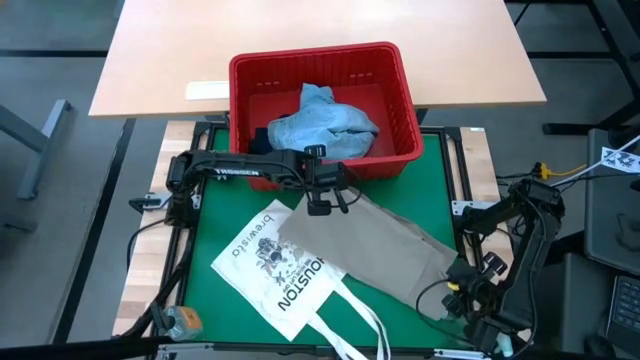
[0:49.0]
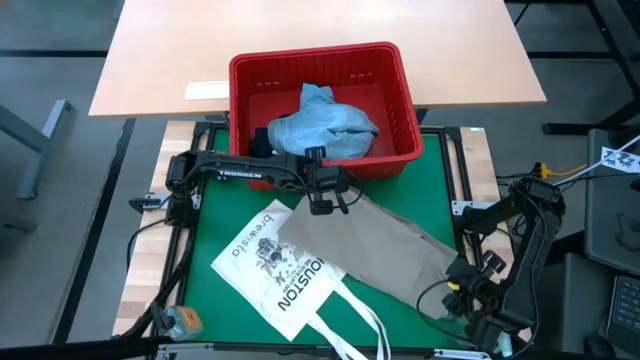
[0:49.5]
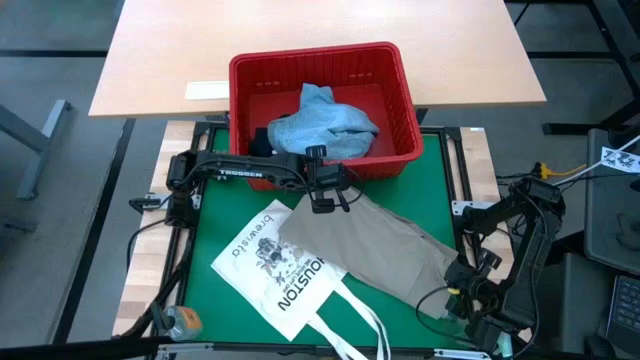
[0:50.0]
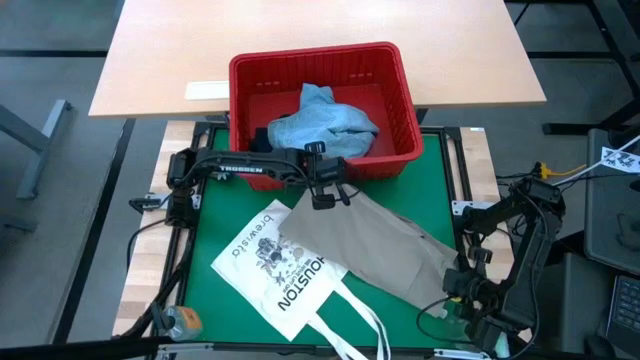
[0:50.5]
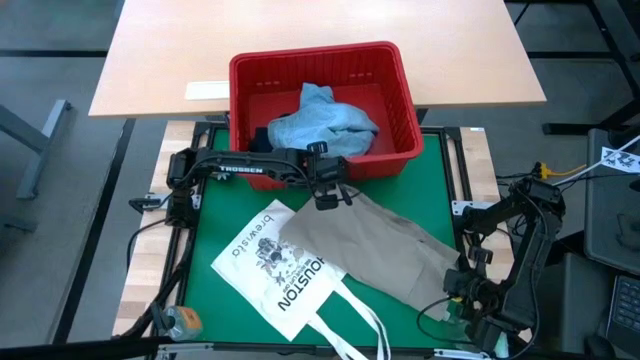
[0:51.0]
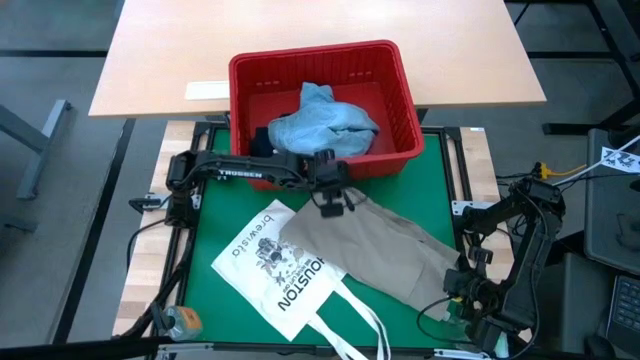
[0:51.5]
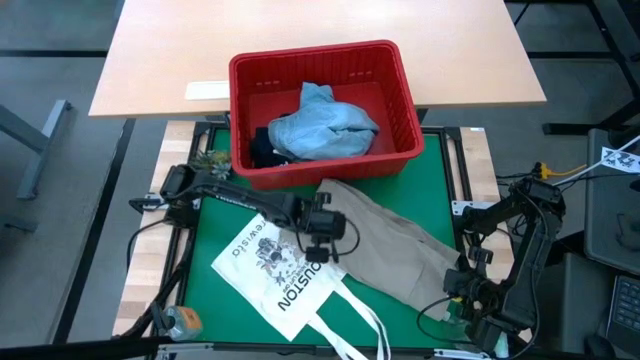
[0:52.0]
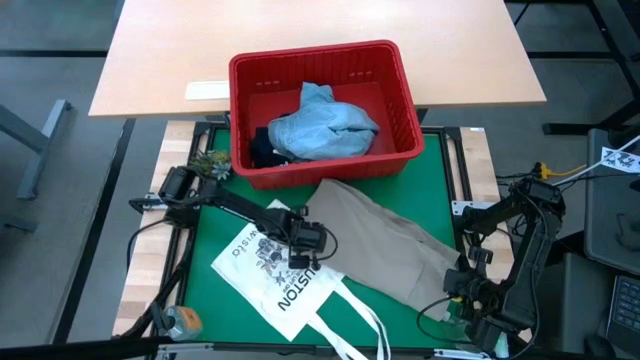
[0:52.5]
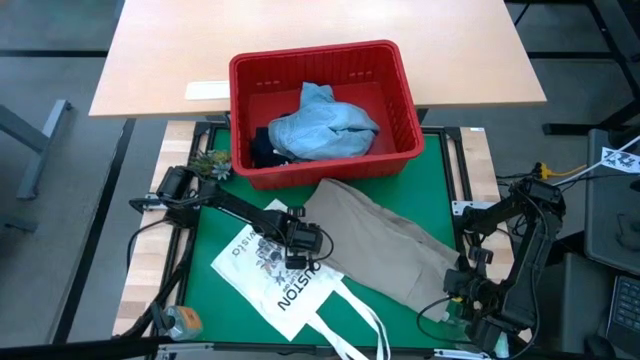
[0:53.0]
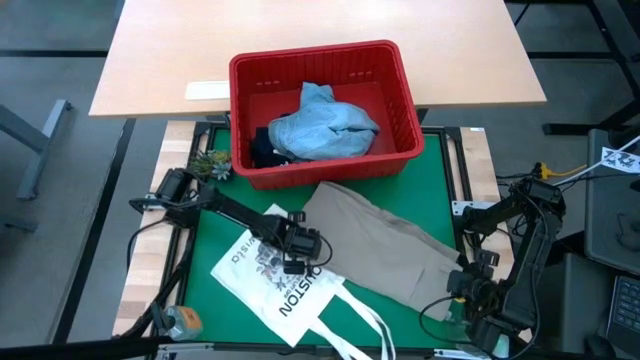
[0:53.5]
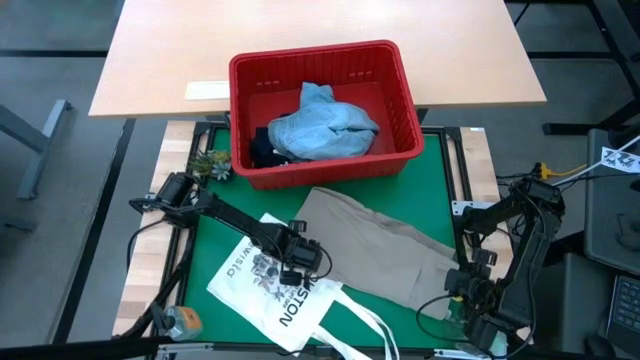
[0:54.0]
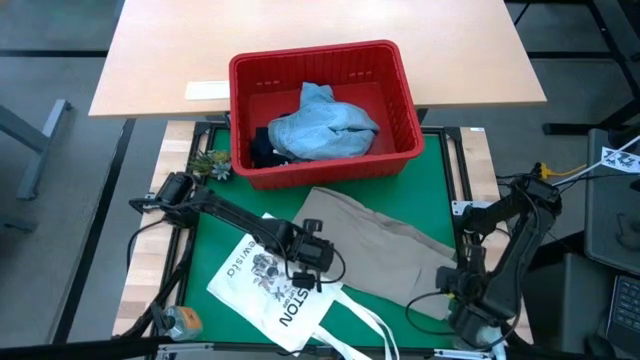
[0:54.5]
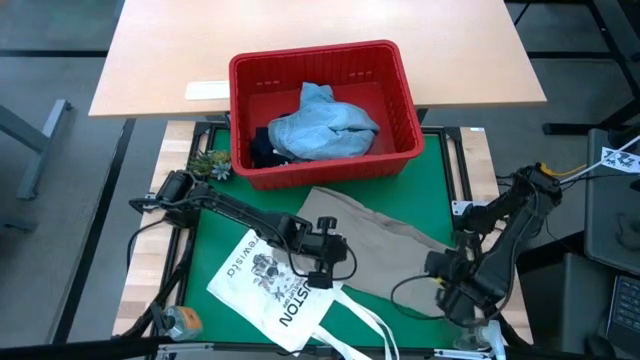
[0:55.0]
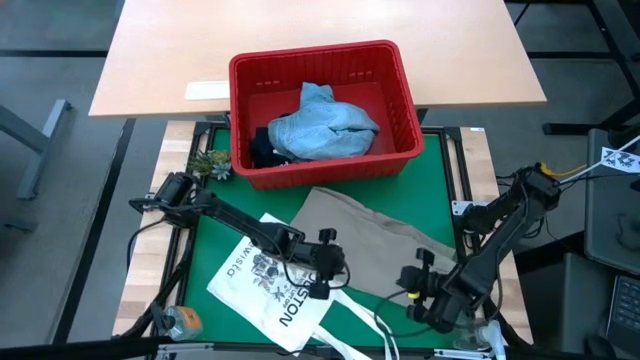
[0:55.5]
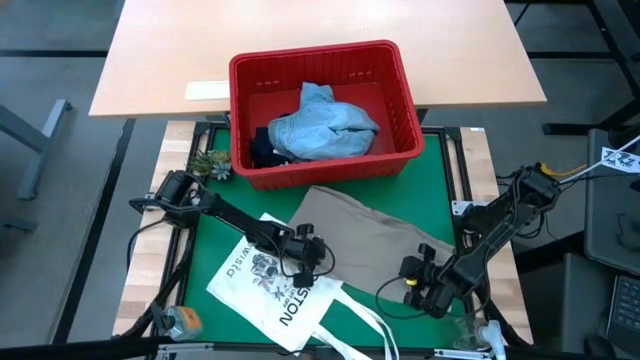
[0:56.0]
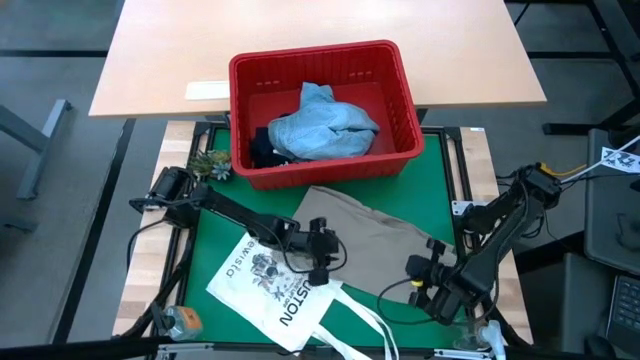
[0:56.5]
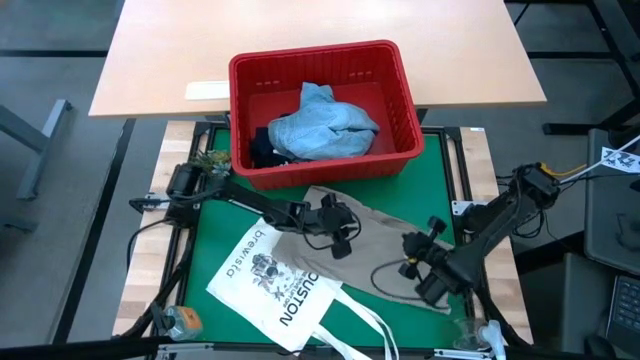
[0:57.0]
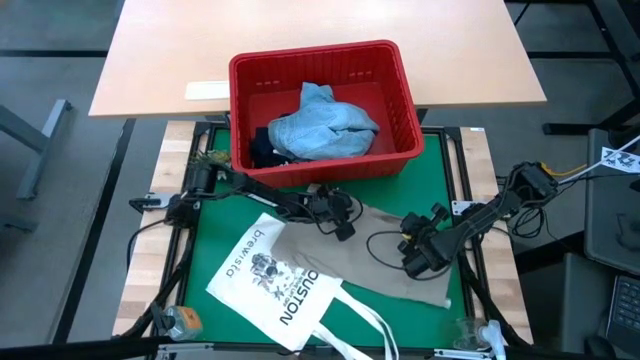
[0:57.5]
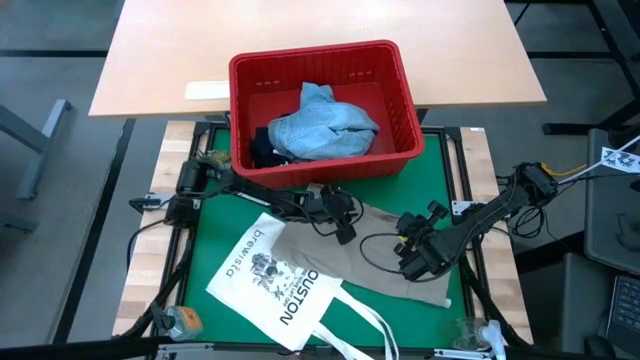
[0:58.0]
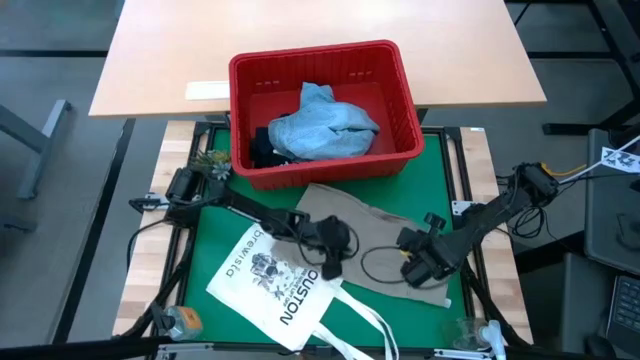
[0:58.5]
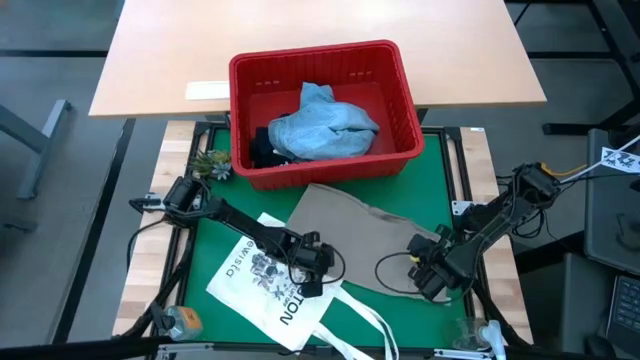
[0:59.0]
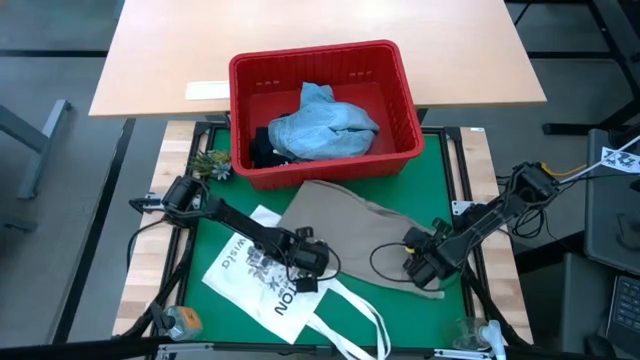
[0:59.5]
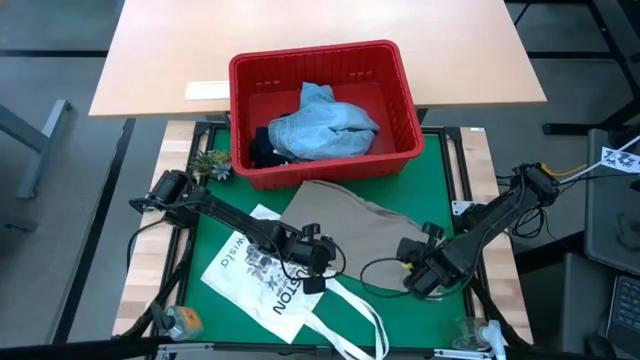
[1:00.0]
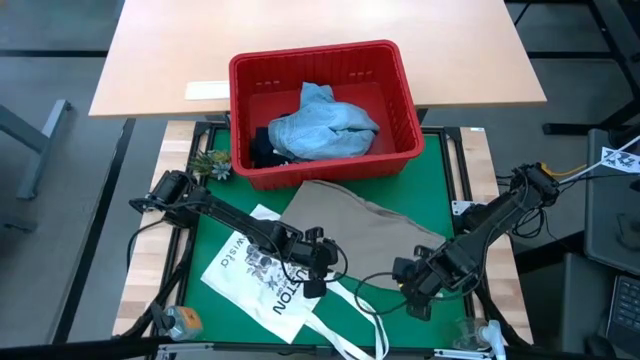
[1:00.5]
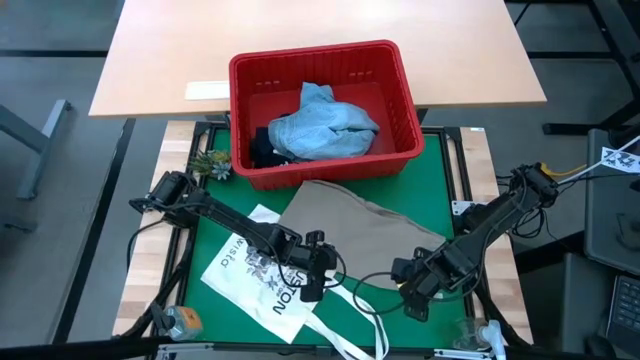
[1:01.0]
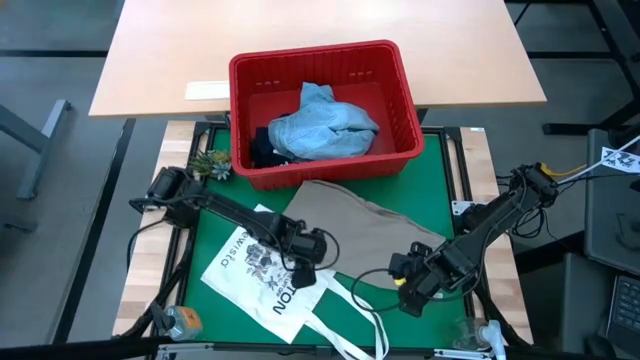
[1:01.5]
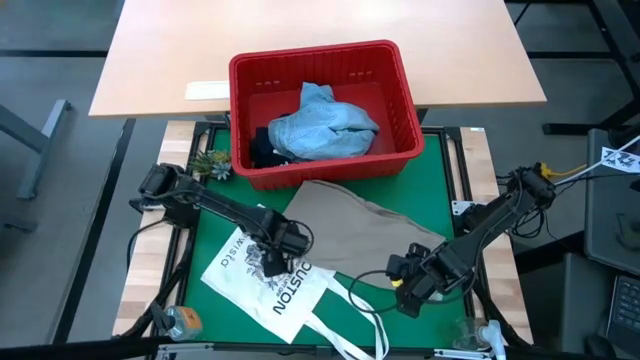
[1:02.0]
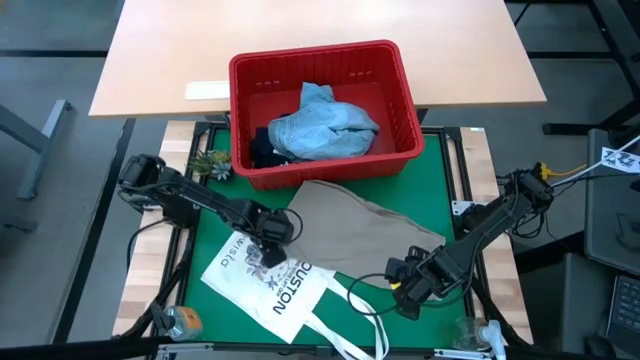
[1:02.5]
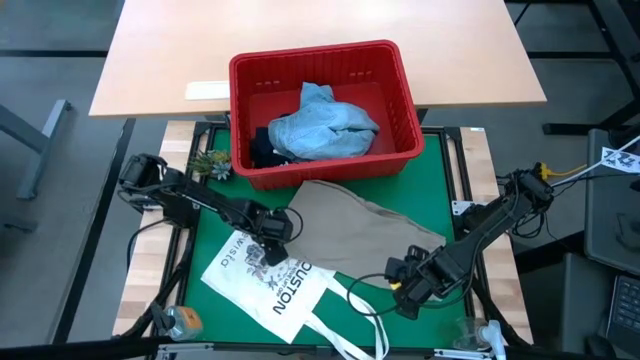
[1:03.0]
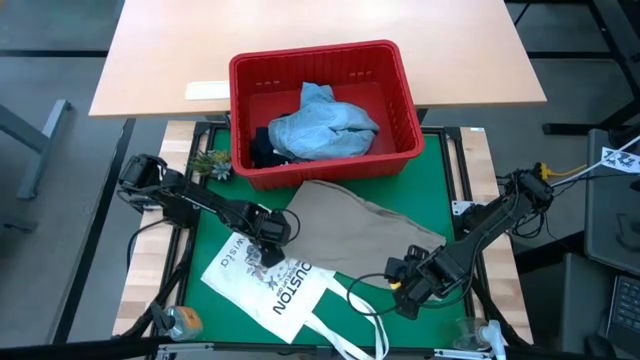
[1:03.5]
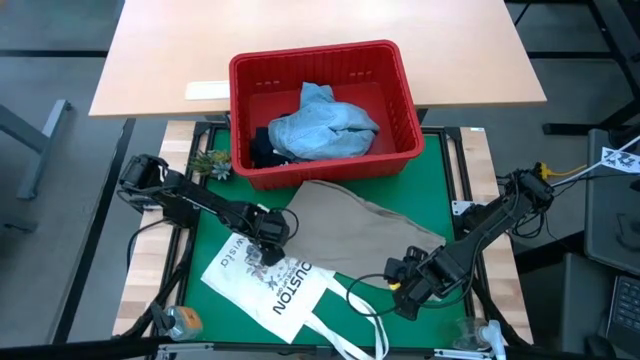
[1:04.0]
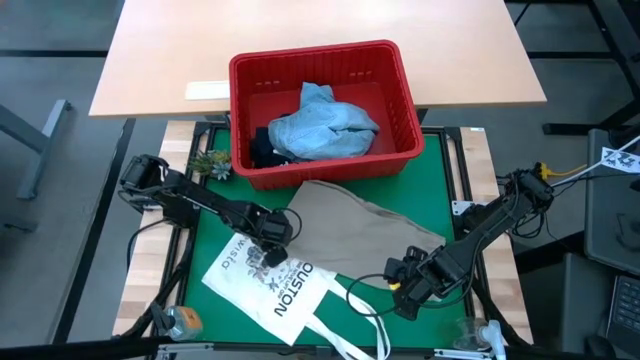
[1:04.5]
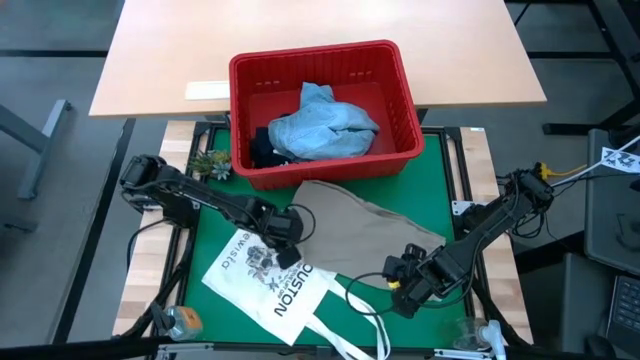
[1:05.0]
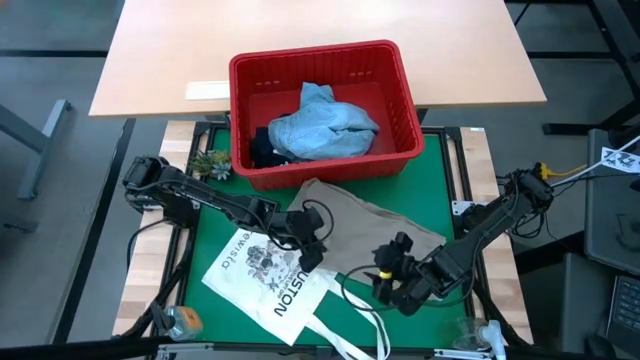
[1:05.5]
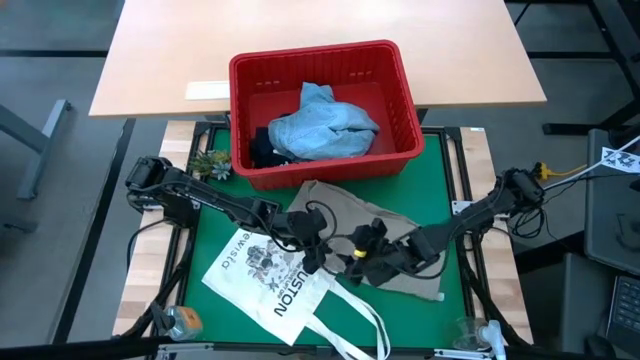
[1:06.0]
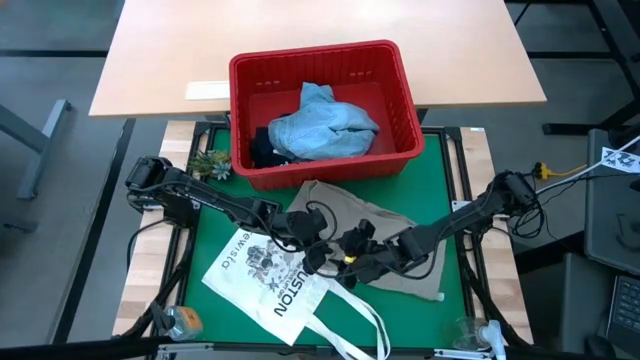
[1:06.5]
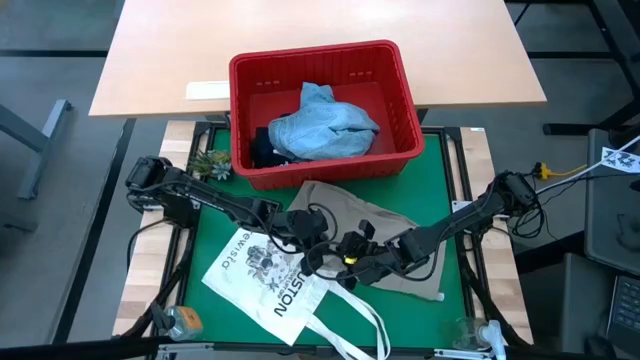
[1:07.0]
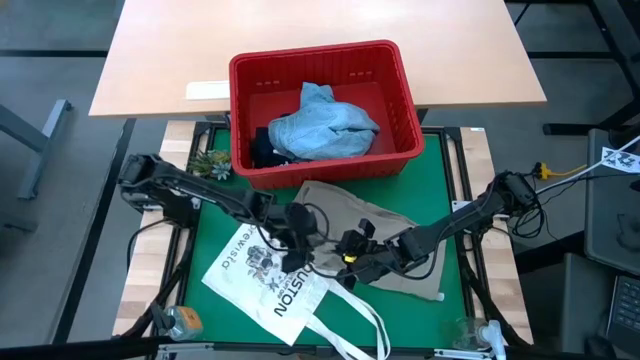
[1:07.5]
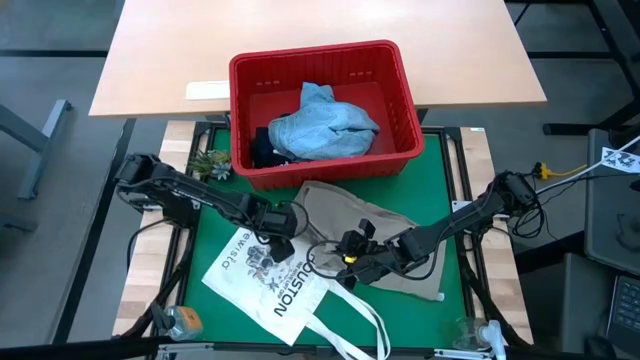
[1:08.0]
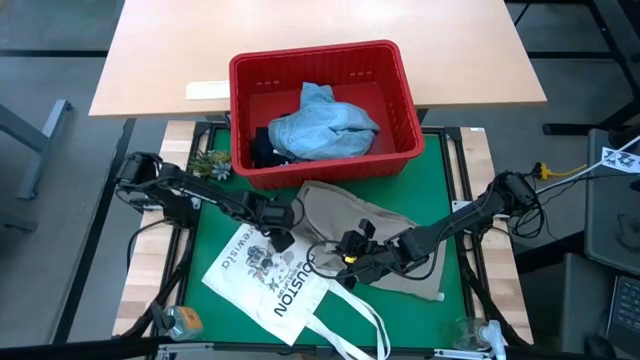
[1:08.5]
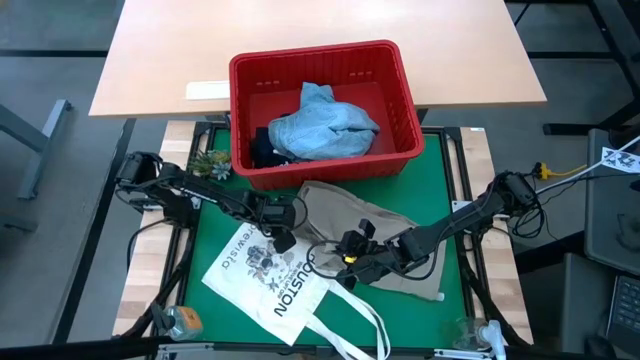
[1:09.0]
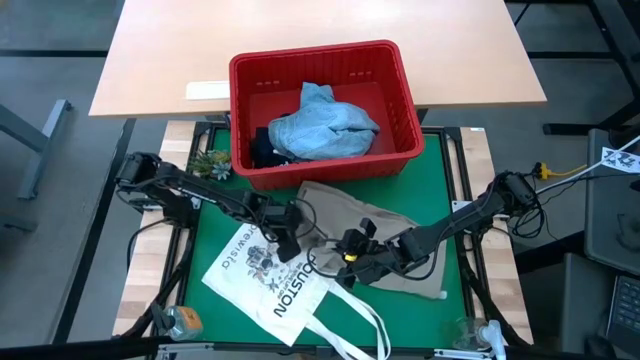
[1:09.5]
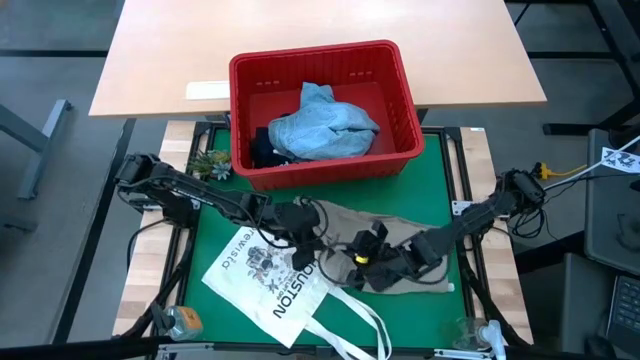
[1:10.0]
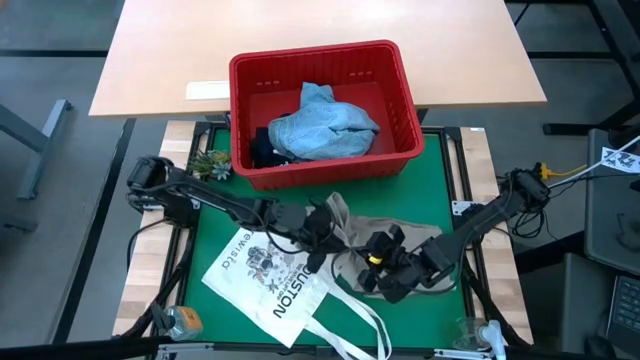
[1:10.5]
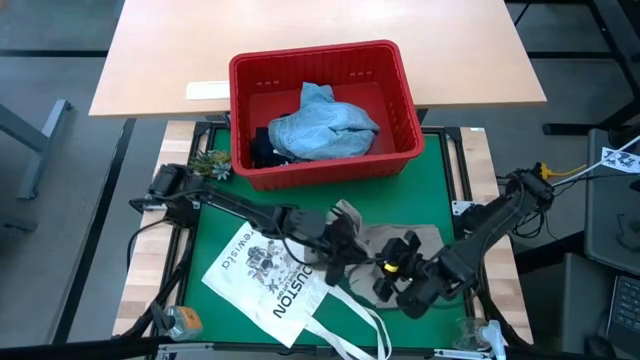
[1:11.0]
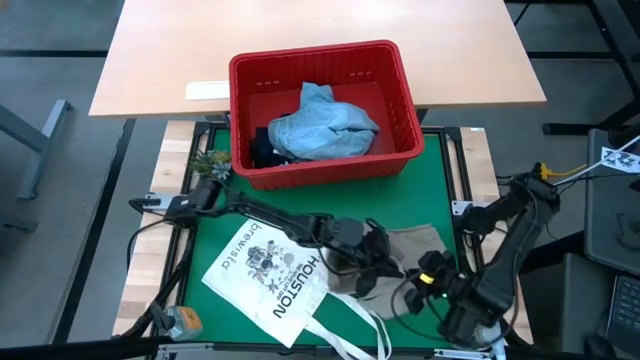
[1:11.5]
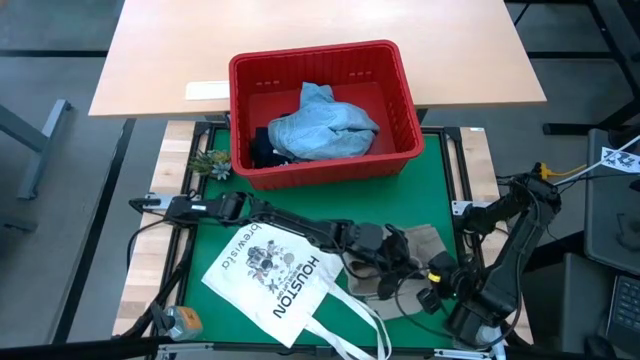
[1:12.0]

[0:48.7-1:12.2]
Task: Fold Laundry from Bin
Fold the beige shorts
